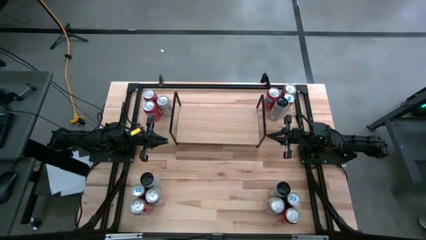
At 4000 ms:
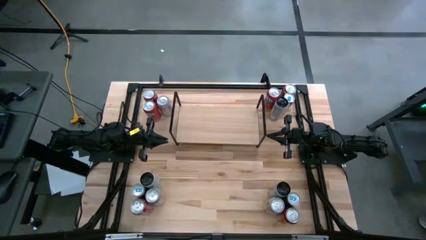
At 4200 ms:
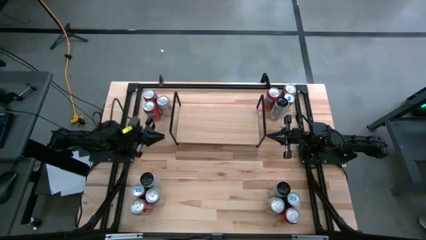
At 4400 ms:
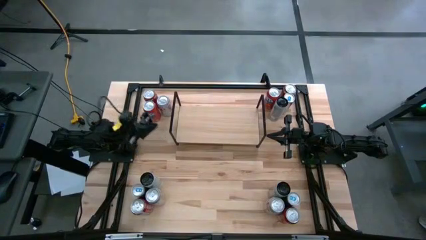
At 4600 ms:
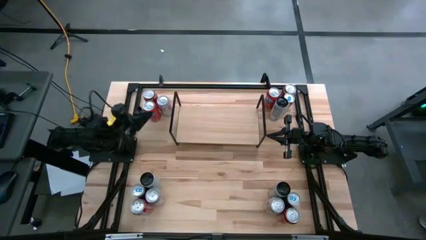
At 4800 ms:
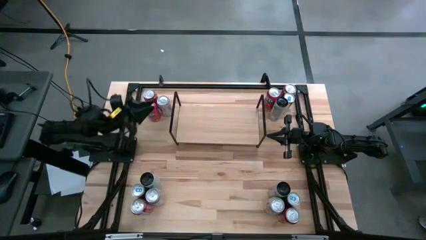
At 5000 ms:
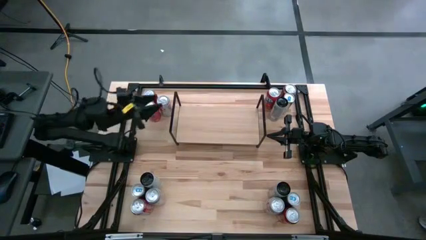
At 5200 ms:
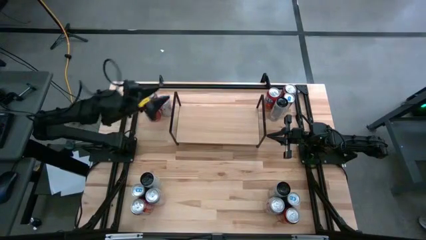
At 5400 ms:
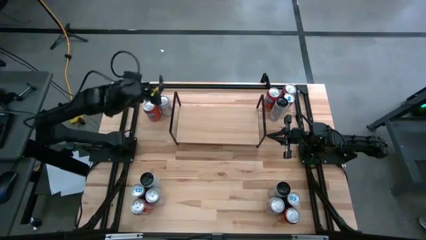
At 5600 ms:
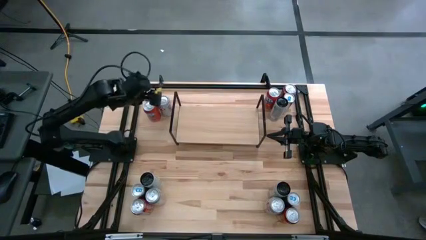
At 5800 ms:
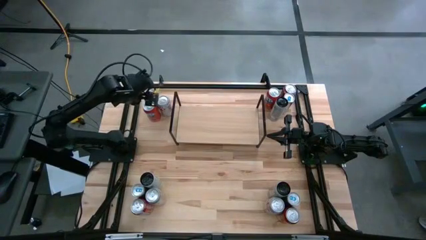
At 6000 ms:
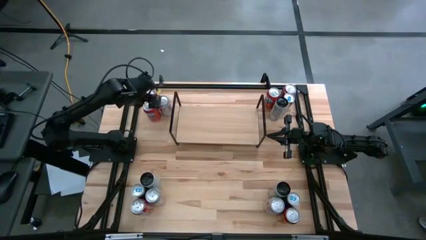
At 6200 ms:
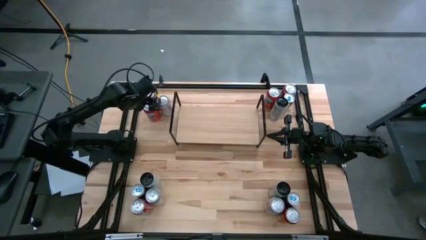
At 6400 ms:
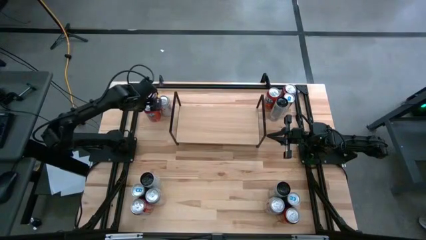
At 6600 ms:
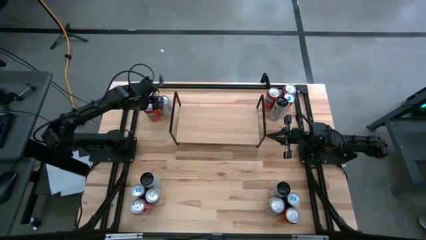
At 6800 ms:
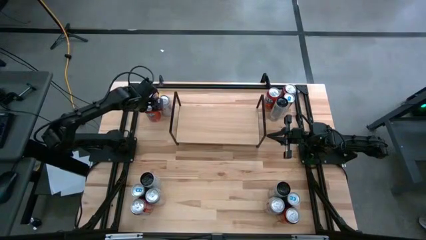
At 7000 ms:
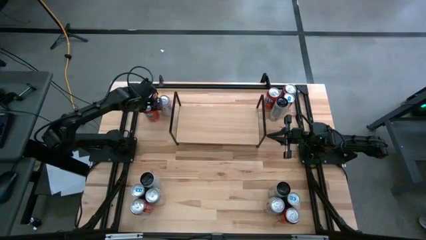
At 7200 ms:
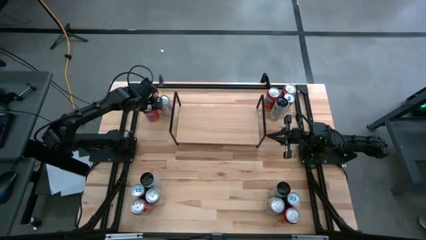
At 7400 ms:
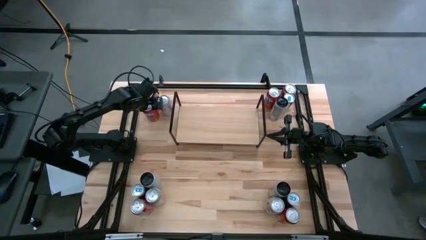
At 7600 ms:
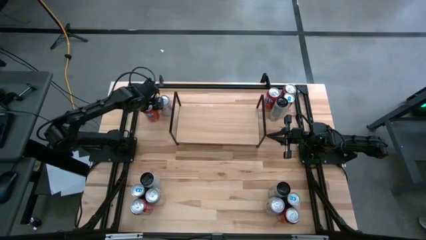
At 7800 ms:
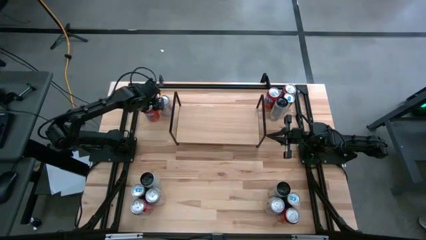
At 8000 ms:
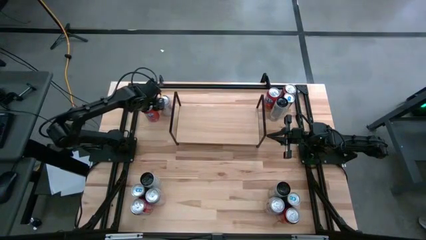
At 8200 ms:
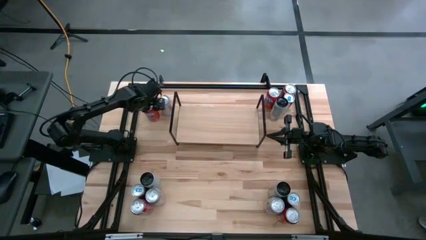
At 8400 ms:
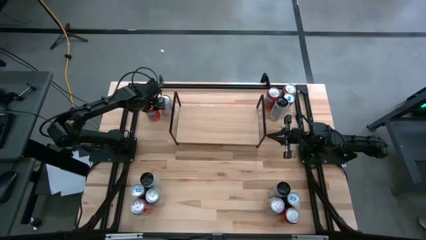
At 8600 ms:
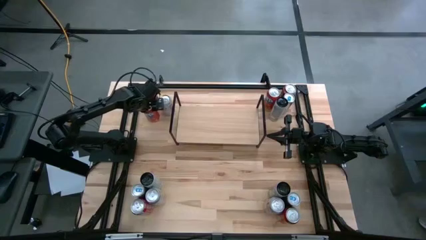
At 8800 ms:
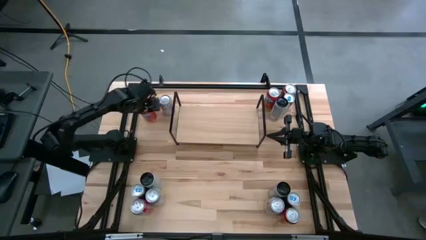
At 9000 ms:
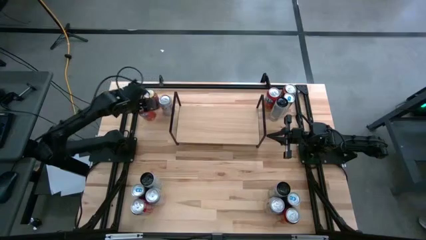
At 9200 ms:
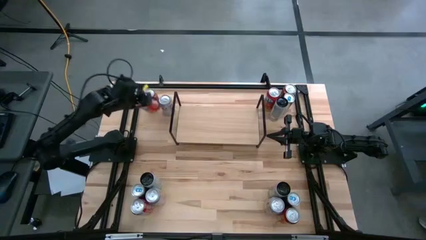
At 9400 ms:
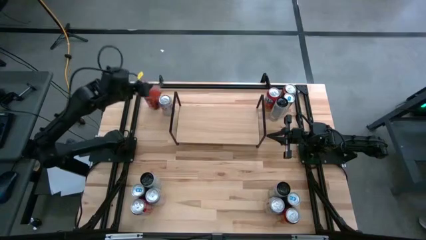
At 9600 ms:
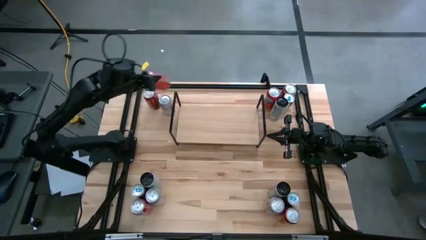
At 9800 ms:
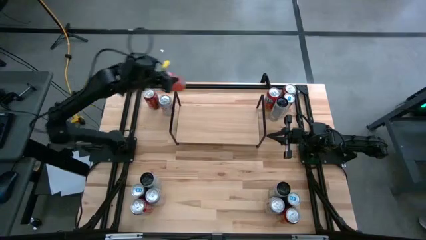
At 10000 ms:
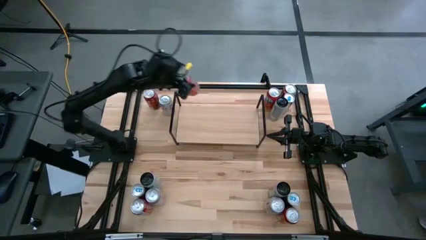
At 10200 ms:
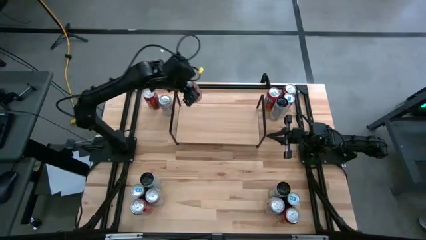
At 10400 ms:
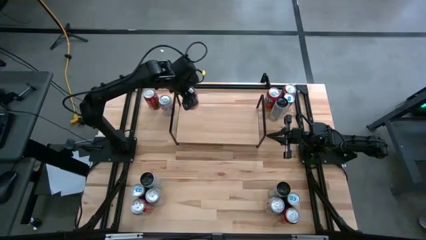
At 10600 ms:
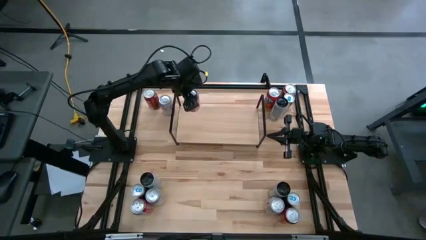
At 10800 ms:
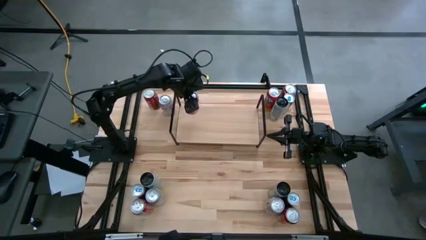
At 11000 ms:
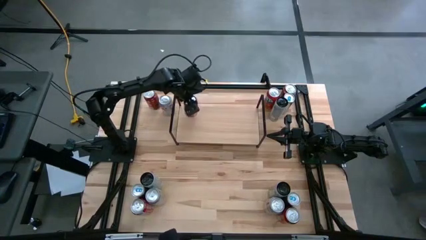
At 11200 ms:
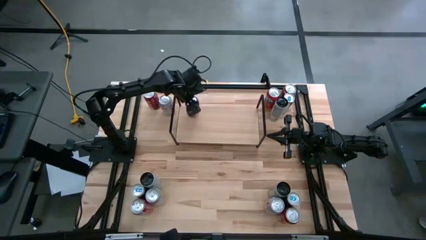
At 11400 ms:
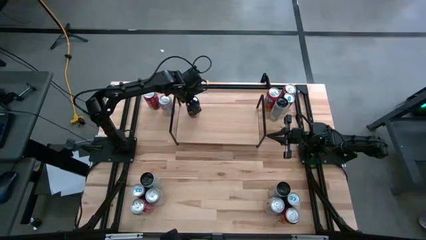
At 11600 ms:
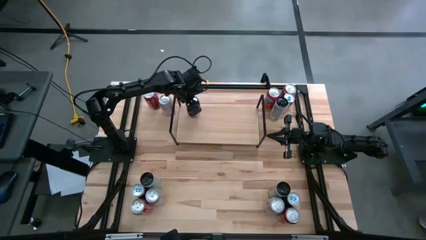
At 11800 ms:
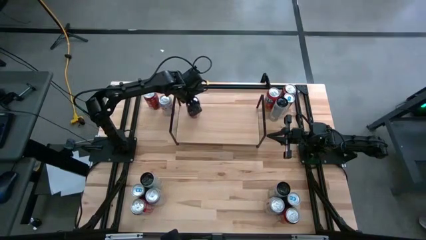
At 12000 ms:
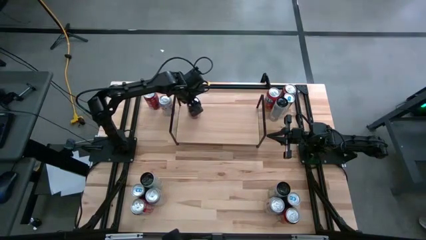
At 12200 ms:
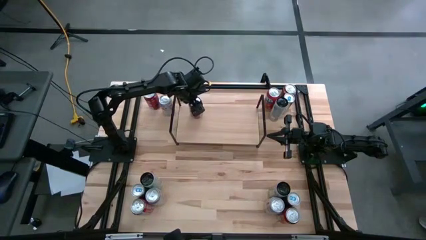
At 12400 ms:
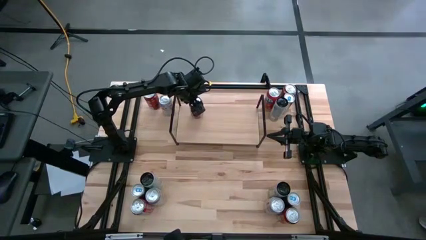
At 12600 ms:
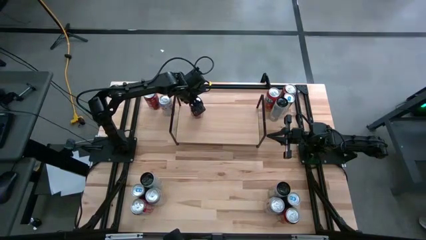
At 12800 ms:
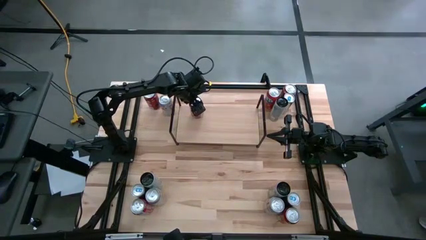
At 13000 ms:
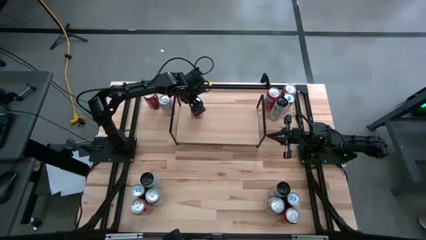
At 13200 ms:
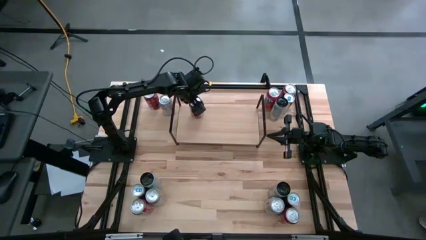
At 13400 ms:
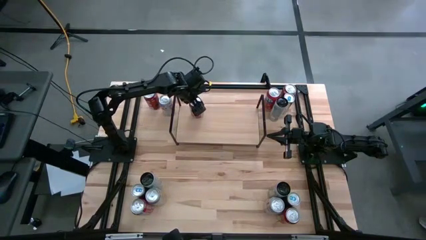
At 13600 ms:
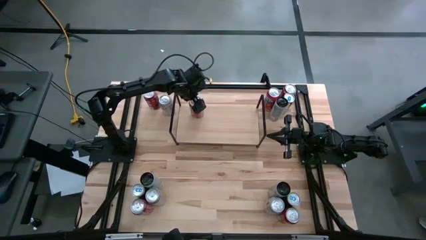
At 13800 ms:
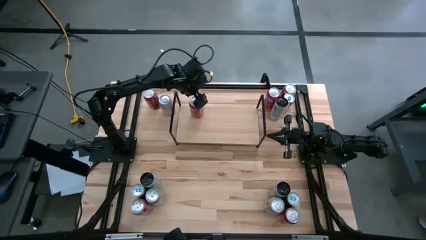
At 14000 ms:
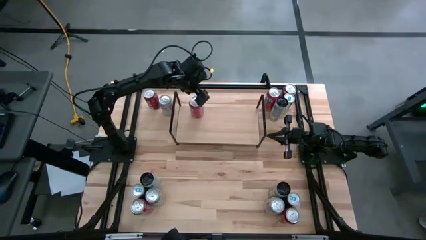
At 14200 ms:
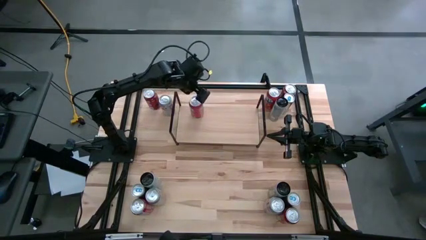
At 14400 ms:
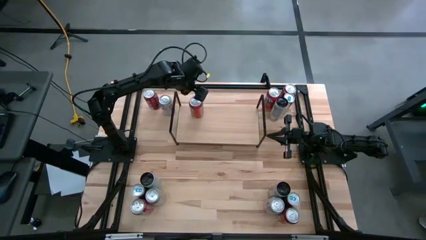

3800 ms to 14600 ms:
Task: Place canned beverage on shelf
Put the top left red soda can on the shelf

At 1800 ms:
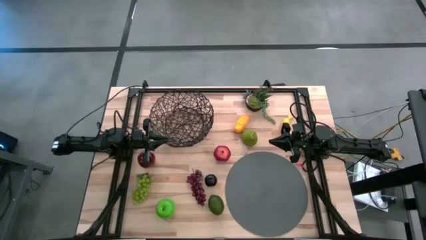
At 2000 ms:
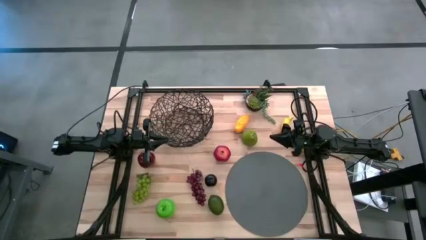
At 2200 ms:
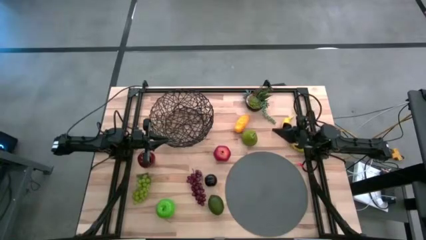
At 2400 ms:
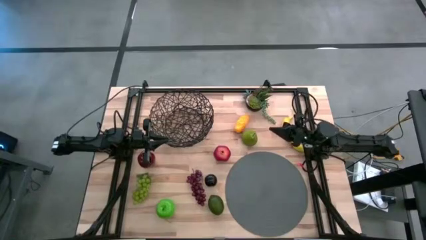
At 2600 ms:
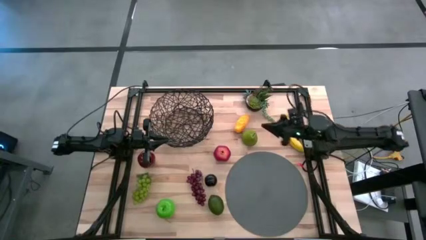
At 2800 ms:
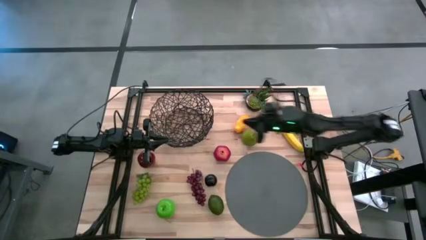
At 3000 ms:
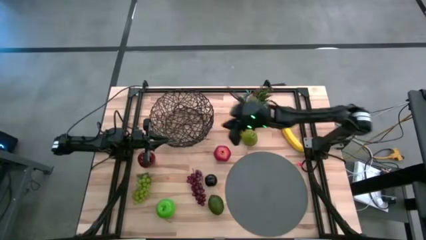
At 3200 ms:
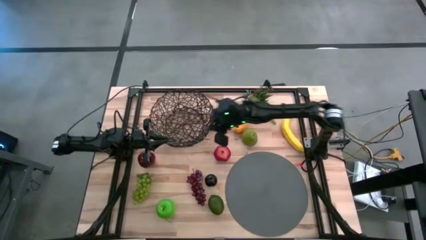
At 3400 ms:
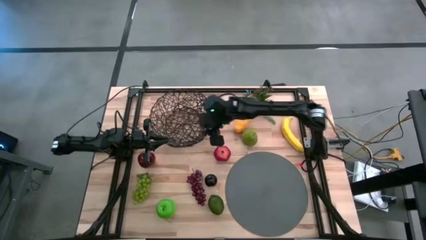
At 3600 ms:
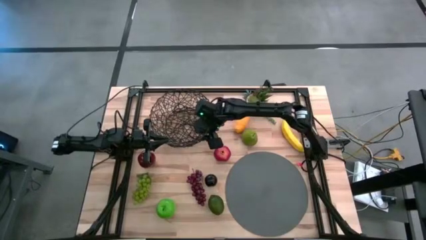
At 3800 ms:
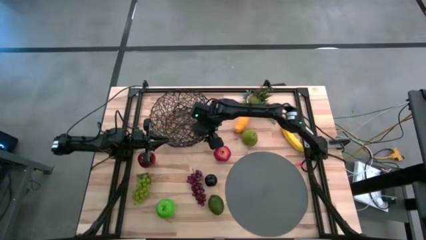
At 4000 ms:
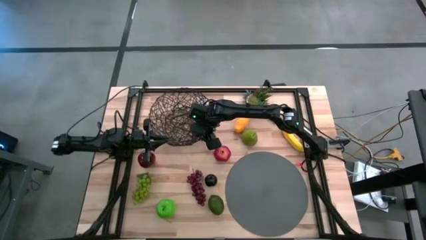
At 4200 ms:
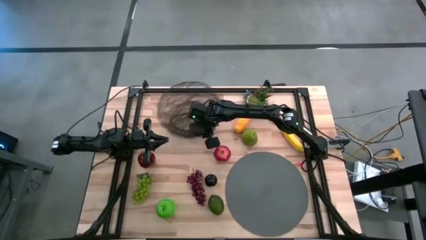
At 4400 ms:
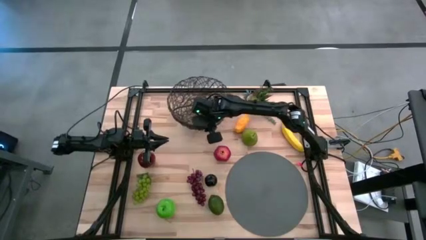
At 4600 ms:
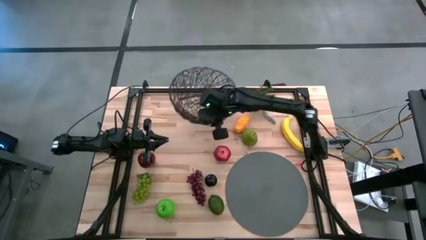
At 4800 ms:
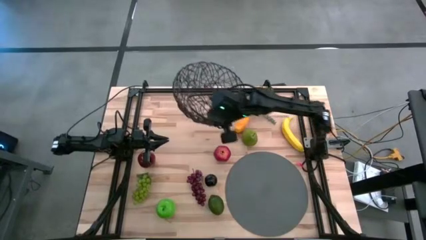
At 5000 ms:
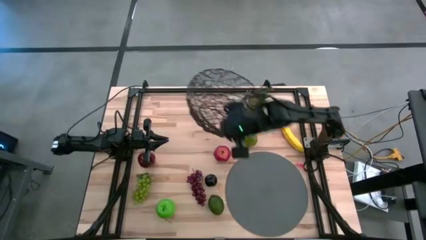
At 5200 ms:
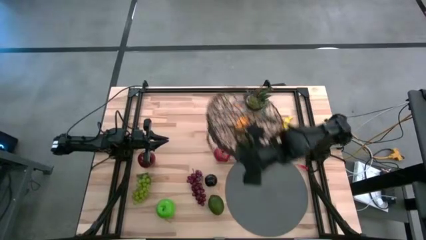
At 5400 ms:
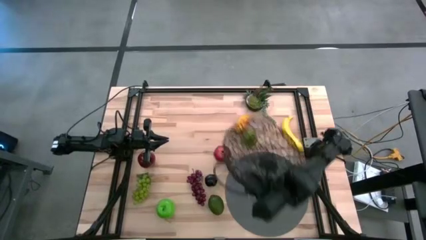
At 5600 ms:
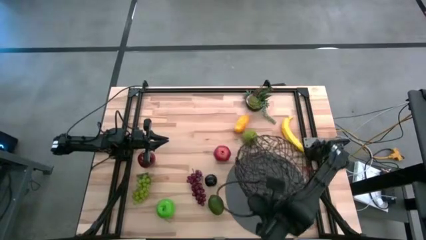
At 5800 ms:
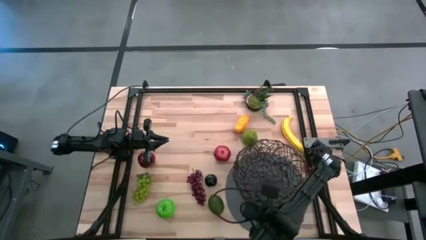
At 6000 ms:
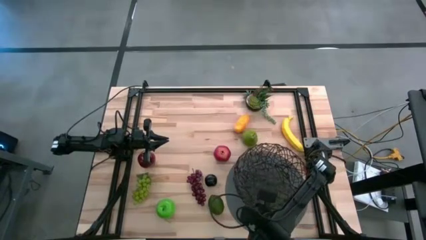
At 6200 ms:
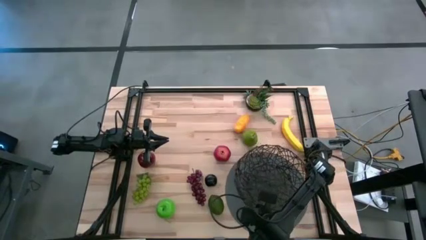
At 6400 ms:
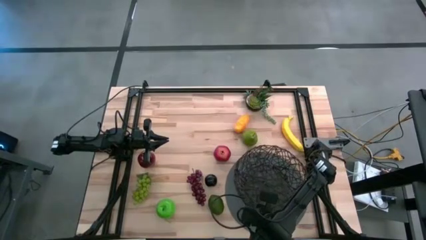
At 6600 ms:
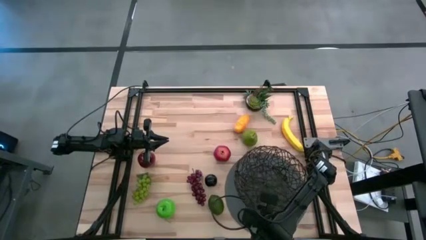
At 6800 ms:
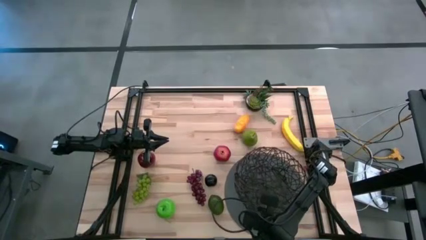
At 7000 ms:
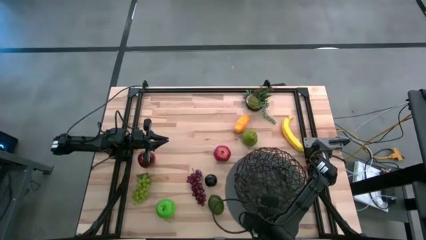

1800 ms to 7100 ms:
Task: Build produce basket
Put the black wire basket on the gray table mat
